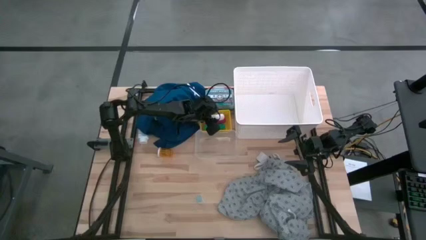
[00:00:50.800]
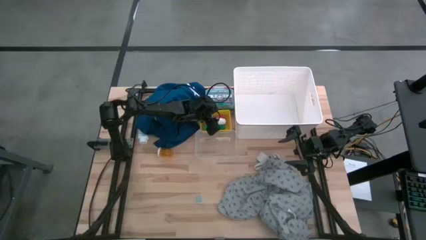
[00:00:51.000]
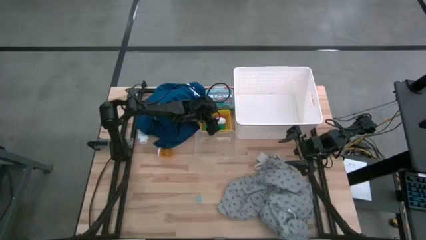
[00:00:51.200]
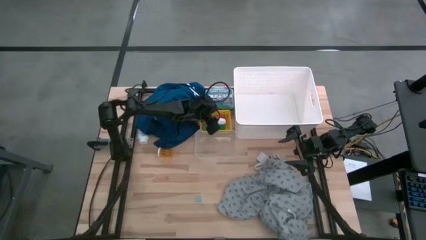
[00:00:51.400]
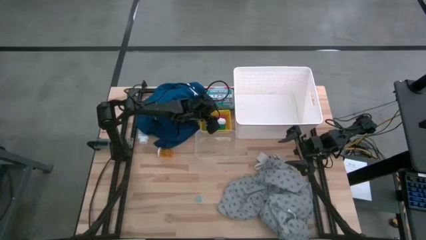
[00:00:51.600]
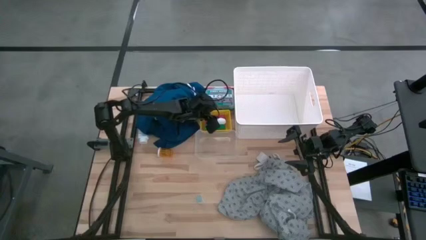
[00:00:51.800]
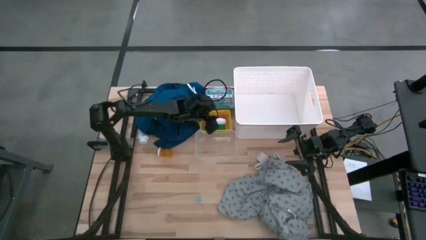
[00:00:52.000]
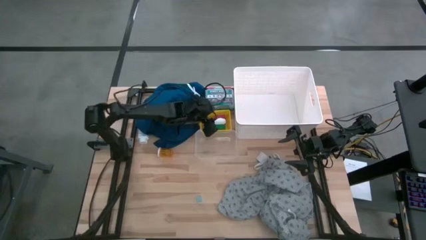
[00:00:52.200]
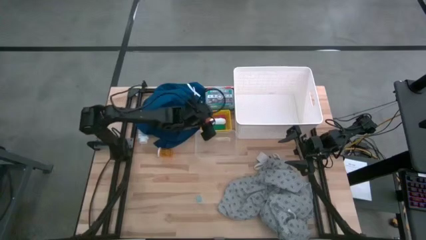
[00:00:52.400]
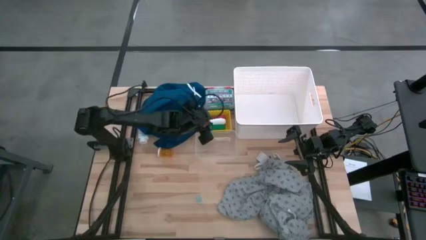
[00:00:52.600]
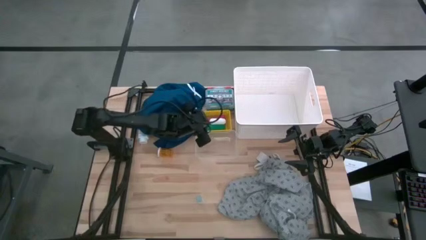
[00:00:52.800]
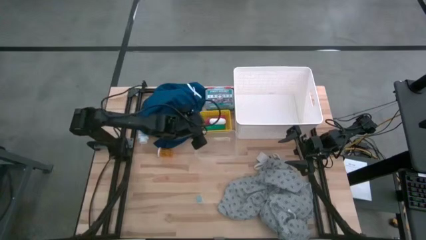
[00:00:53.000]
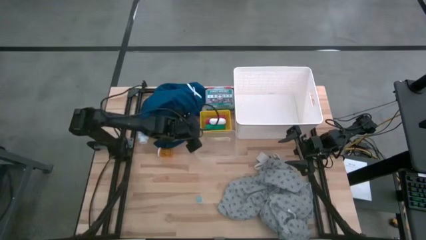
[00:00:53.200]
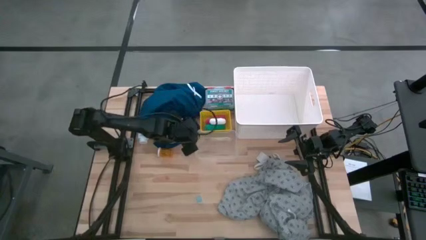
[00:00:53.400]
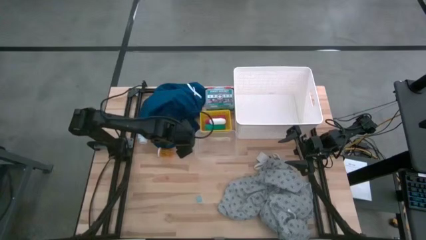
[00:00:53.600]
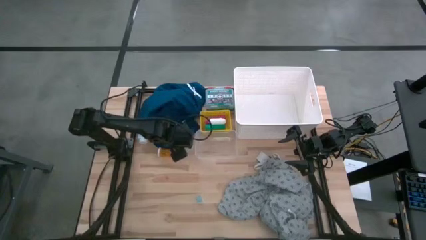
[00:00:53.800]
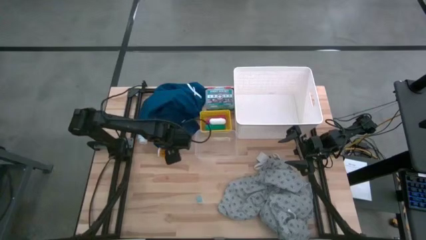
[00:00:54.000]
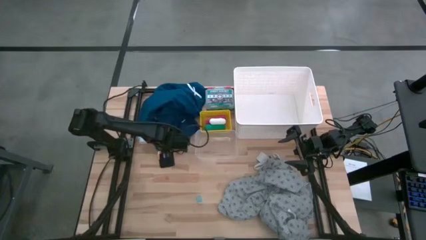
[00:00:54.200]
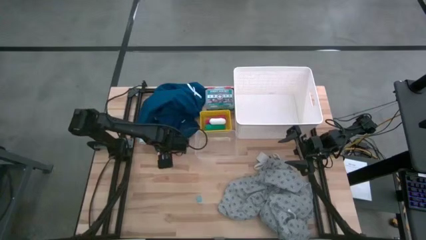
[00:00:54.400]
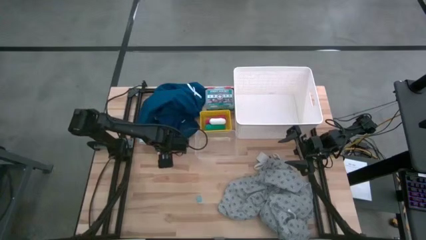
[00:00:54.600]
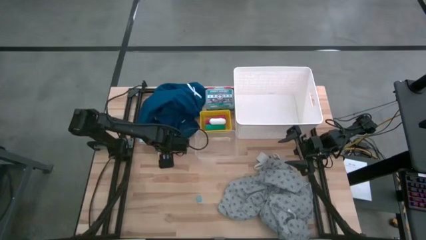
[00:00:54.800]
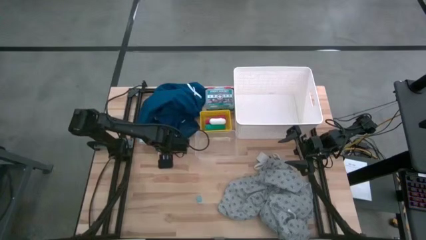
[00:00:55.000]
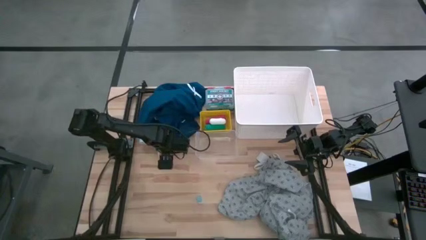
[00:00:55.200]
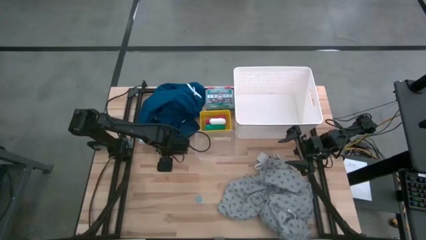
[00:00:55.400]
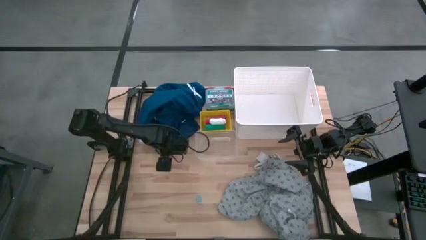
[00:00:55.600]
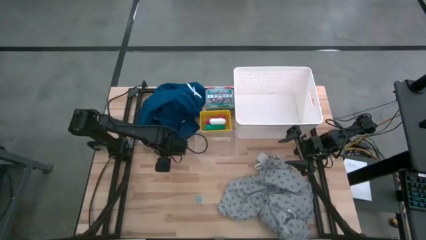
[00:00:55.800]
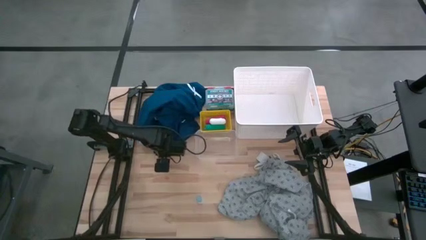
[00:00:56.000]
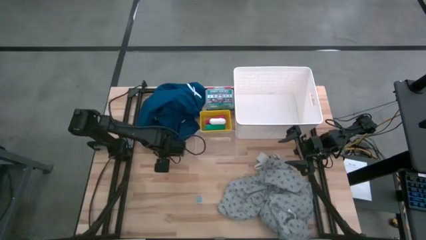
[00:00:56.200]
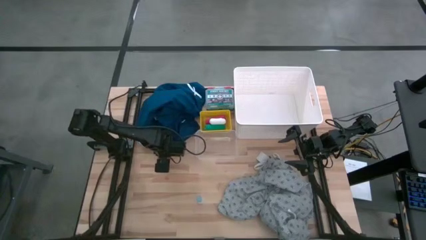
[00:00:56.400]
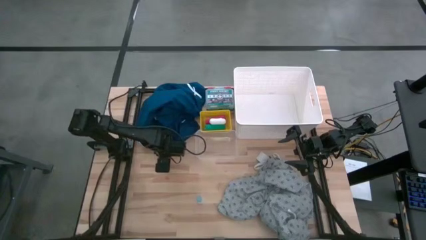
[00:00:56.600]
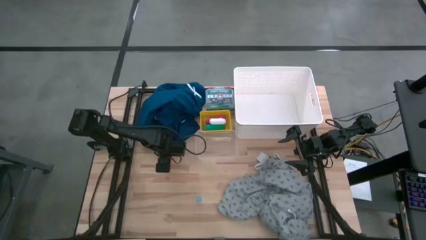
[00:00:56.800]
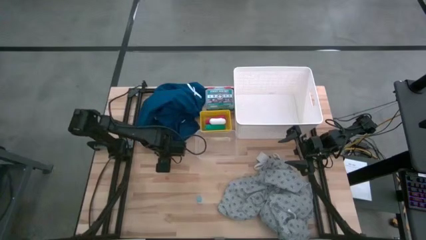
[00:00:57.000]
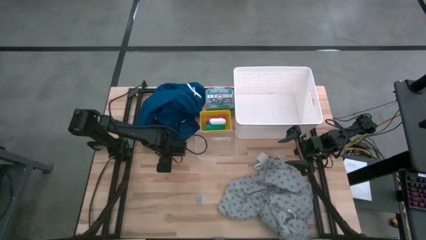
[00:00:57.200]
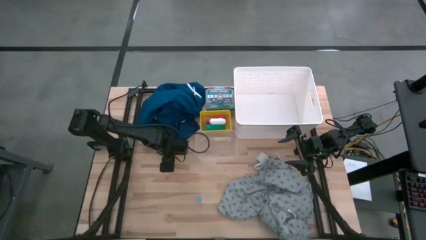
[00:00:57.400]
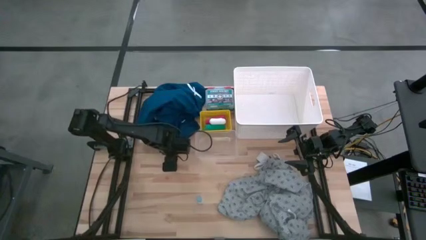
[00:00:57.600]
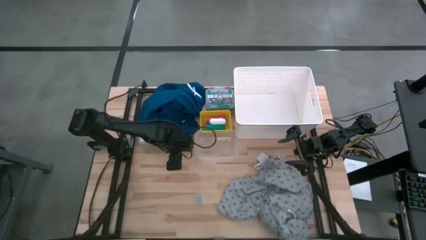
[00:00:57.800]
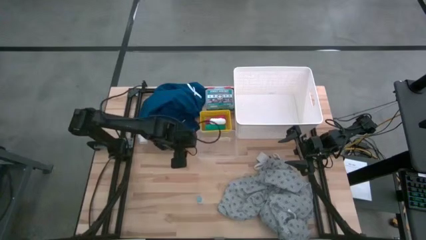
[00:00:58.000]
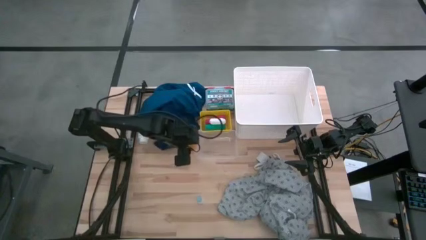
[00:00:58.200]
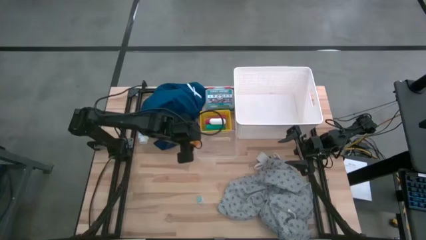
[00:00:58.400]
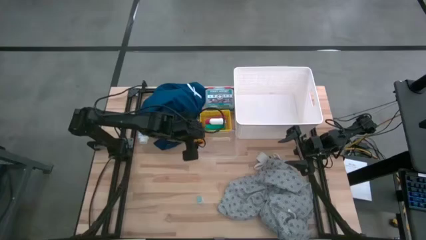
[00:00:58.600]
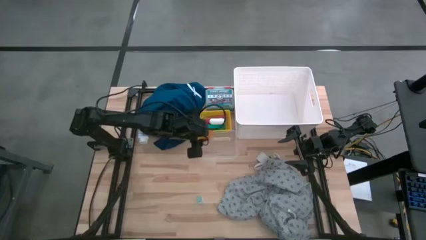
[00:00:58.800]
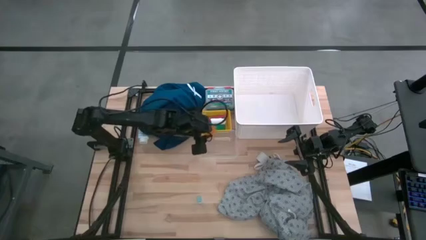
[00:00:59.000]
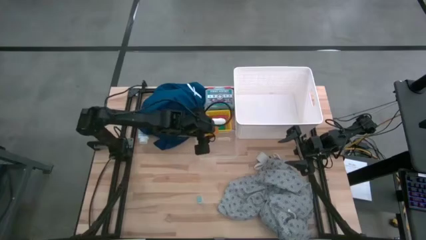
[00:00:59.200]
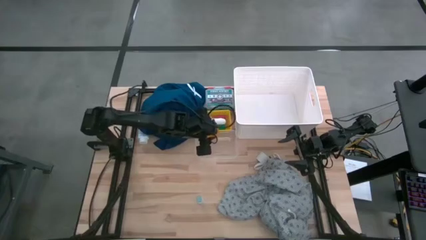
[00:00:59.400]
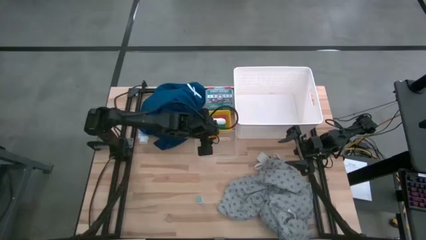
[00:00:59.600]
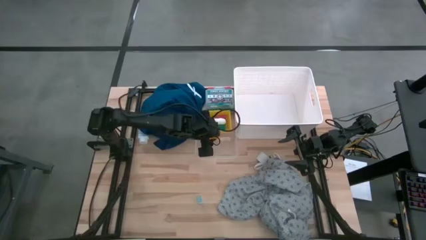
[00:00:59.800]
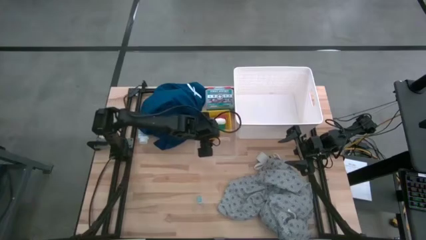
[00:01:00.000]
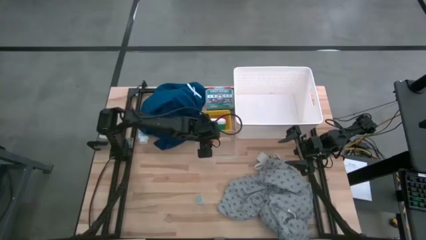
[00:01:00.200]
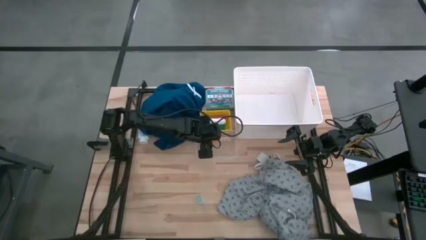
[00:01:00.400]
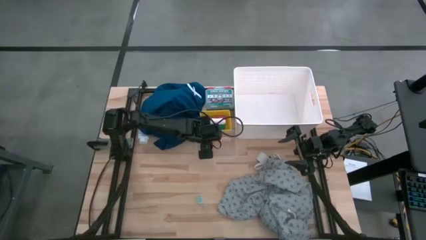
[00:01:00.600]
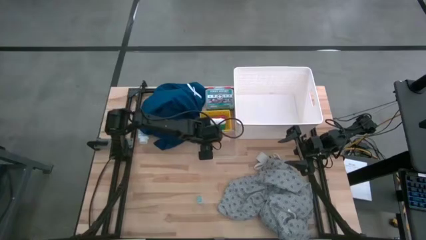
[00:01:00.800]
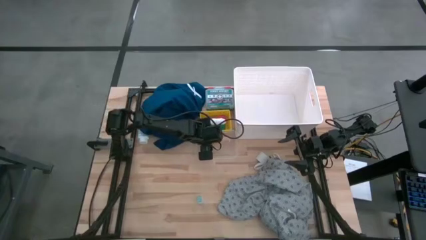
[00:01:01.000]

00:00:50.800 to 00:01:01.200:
Task: Pick & Place Medicine items
Put the orange medicine bottle into the transparent bin
